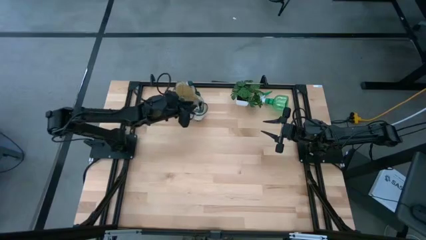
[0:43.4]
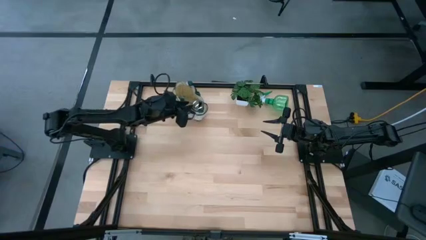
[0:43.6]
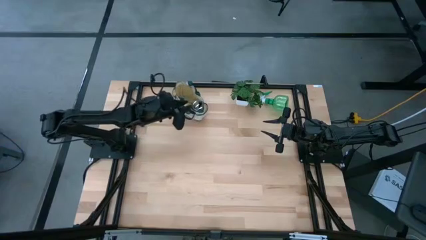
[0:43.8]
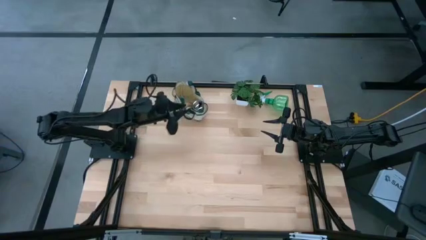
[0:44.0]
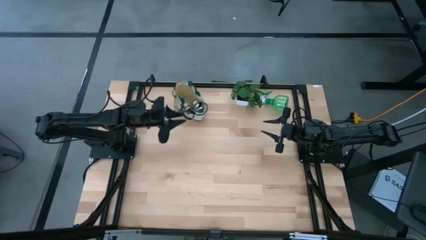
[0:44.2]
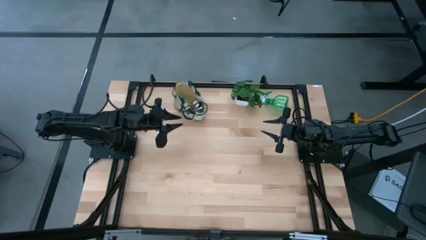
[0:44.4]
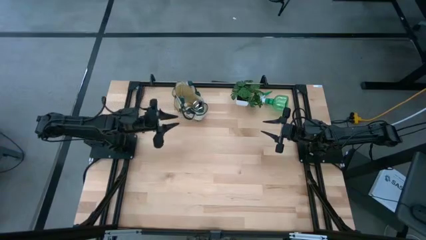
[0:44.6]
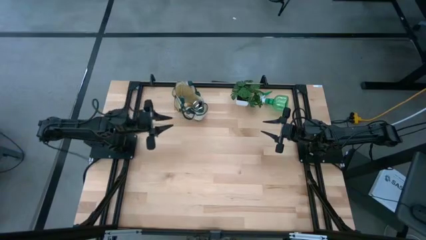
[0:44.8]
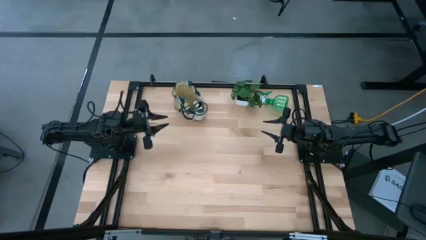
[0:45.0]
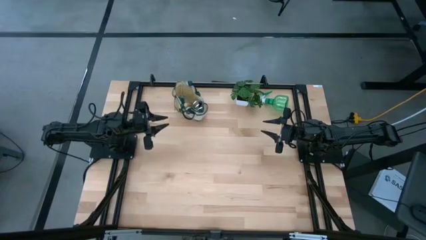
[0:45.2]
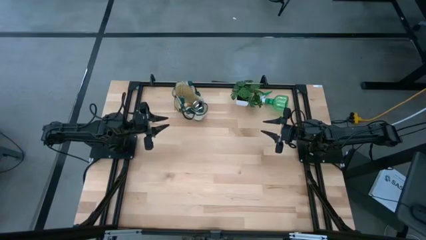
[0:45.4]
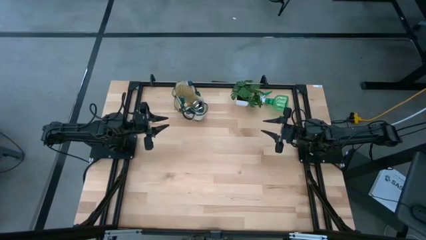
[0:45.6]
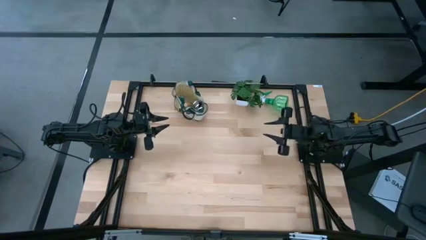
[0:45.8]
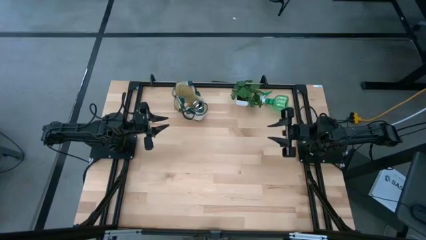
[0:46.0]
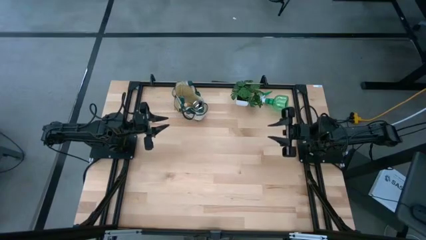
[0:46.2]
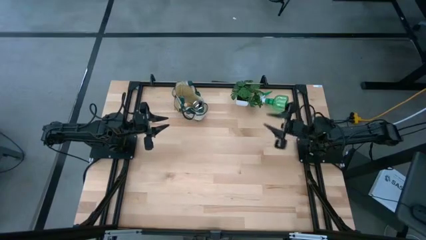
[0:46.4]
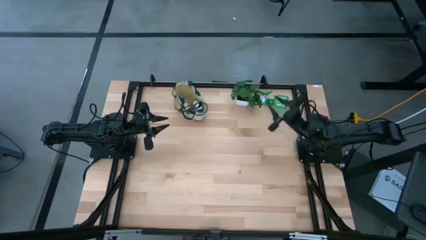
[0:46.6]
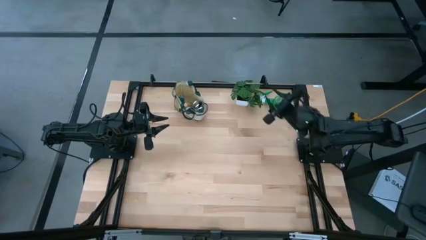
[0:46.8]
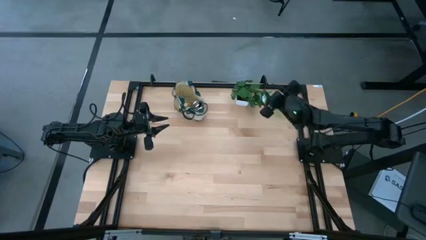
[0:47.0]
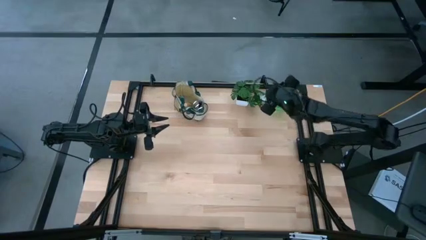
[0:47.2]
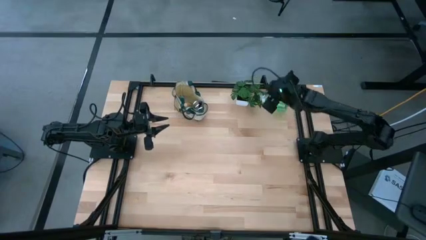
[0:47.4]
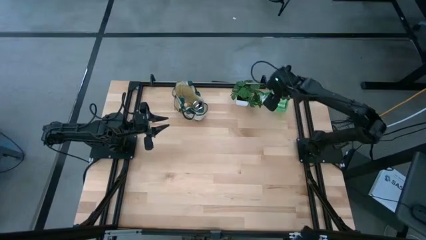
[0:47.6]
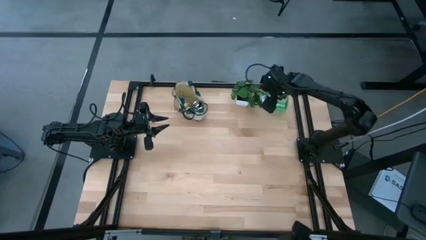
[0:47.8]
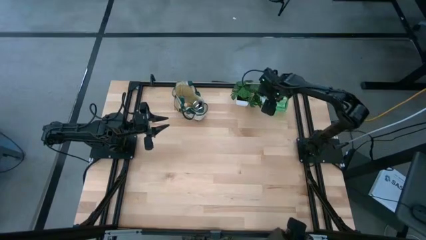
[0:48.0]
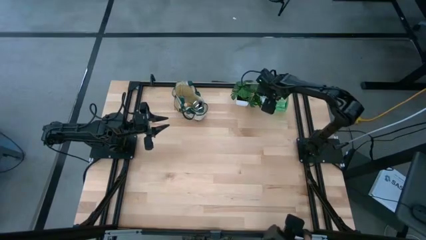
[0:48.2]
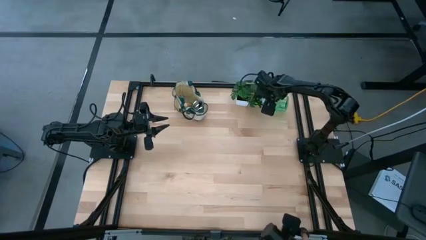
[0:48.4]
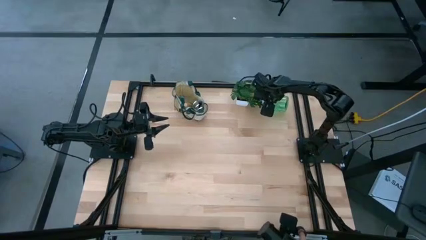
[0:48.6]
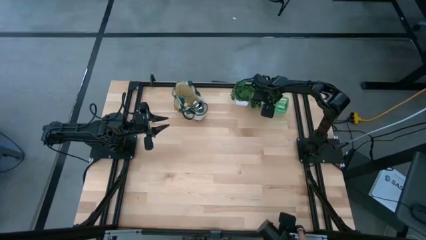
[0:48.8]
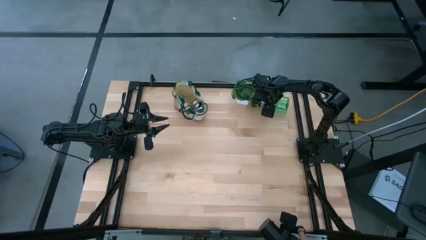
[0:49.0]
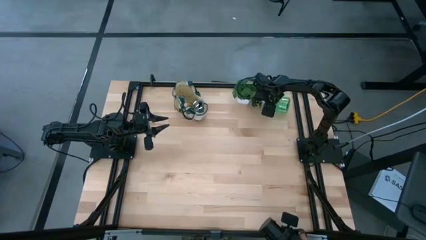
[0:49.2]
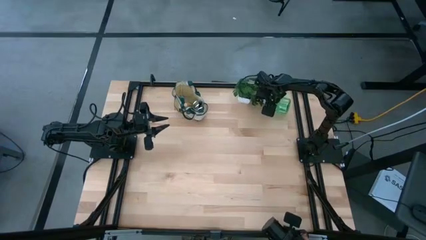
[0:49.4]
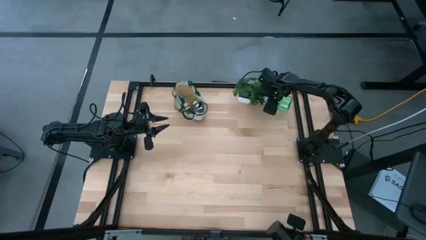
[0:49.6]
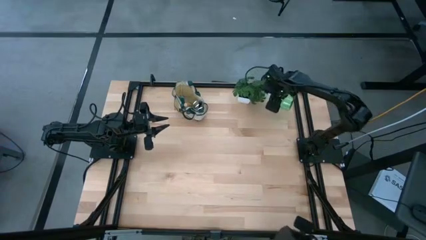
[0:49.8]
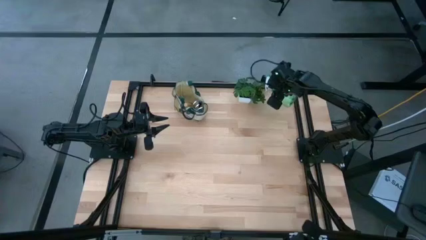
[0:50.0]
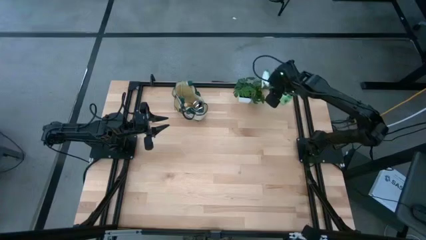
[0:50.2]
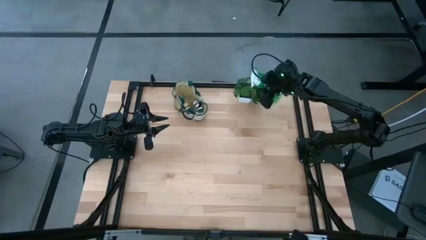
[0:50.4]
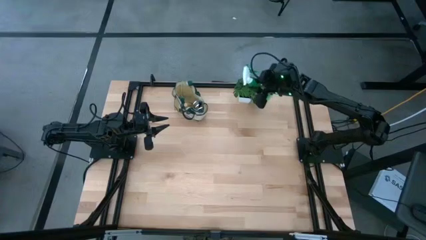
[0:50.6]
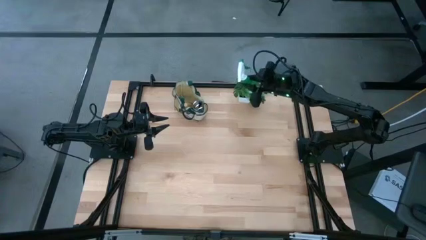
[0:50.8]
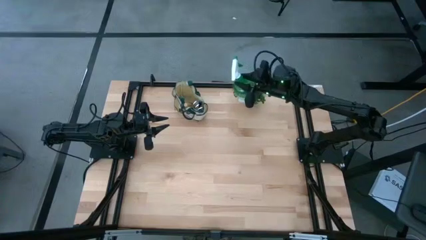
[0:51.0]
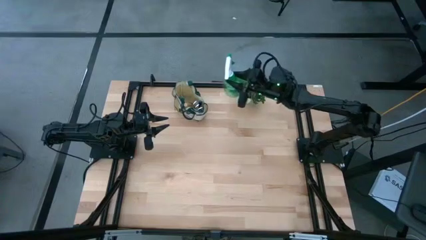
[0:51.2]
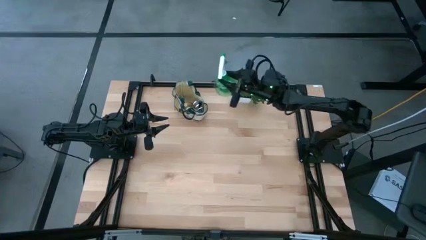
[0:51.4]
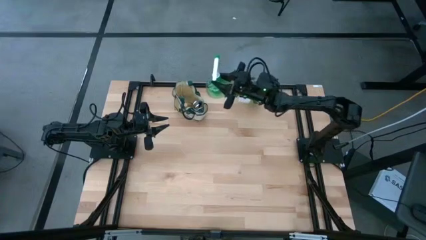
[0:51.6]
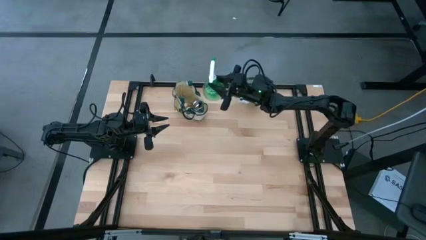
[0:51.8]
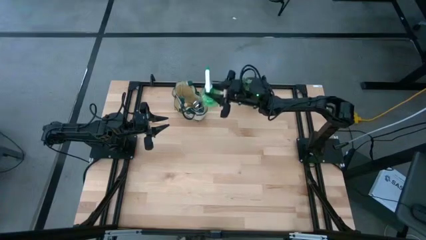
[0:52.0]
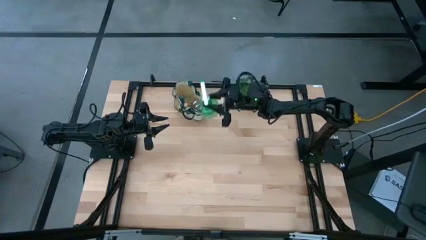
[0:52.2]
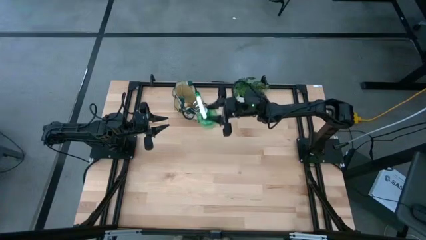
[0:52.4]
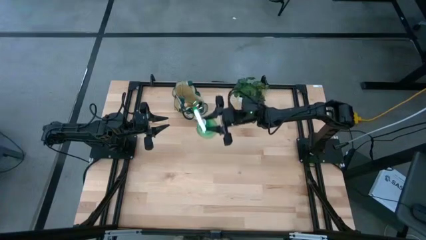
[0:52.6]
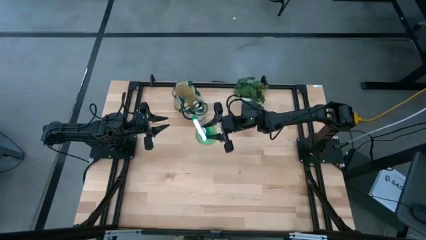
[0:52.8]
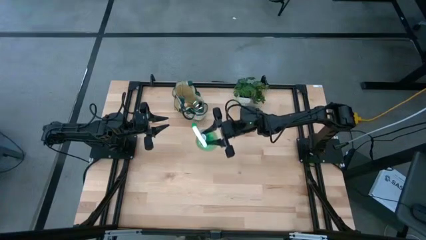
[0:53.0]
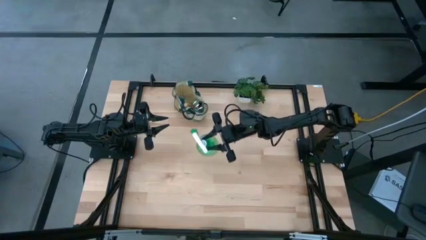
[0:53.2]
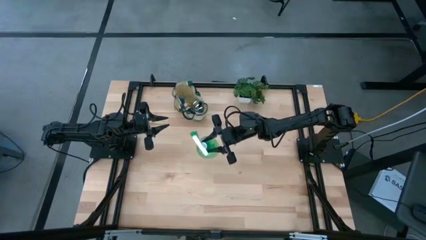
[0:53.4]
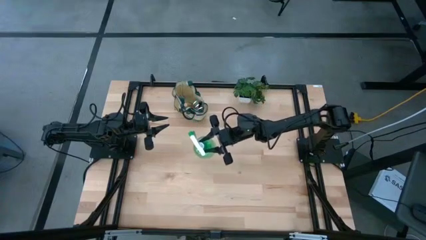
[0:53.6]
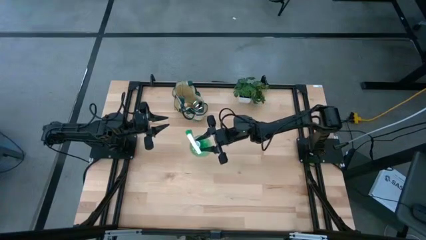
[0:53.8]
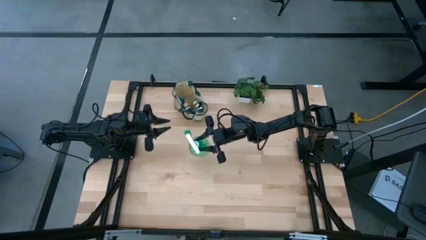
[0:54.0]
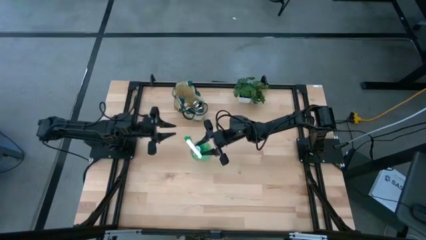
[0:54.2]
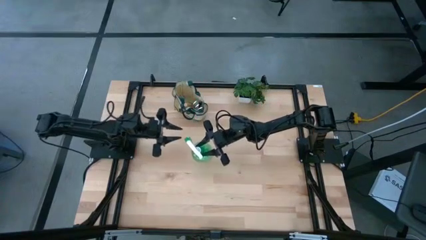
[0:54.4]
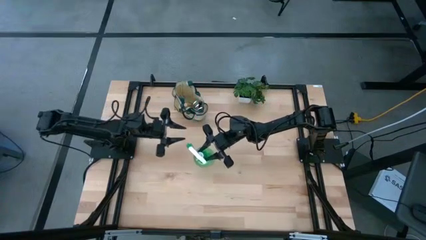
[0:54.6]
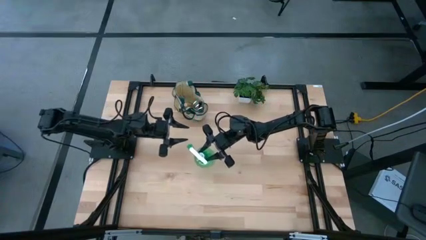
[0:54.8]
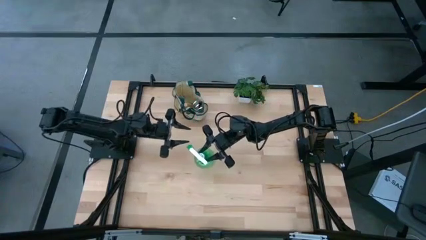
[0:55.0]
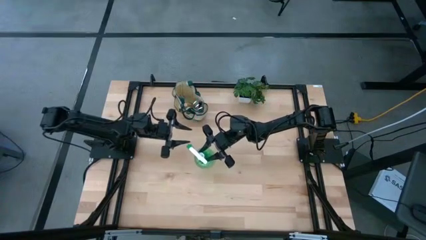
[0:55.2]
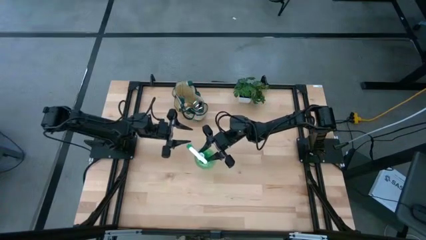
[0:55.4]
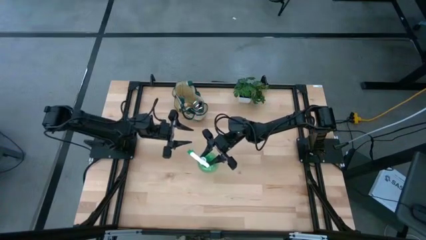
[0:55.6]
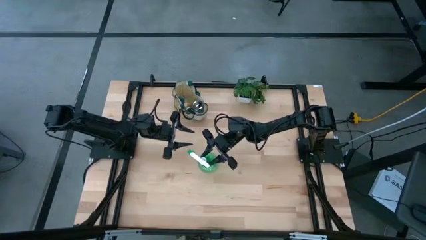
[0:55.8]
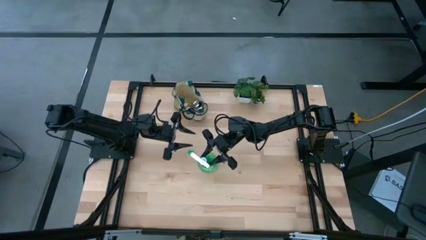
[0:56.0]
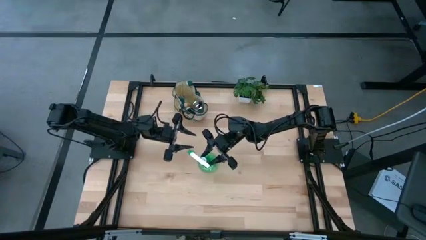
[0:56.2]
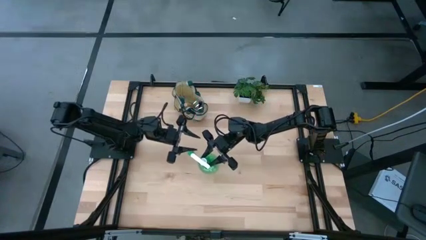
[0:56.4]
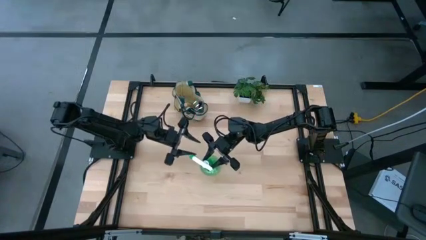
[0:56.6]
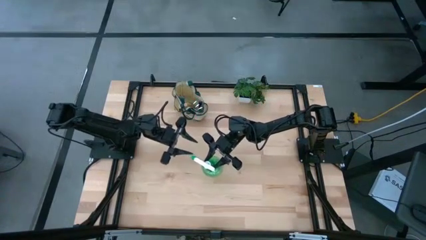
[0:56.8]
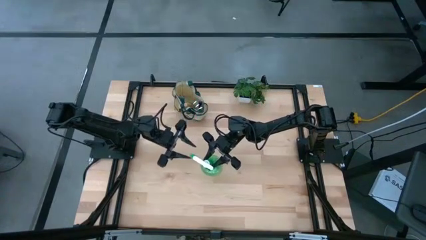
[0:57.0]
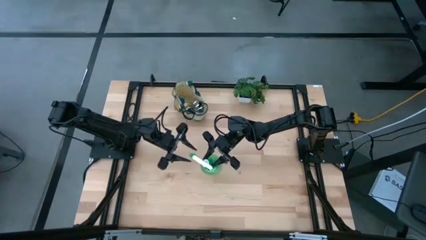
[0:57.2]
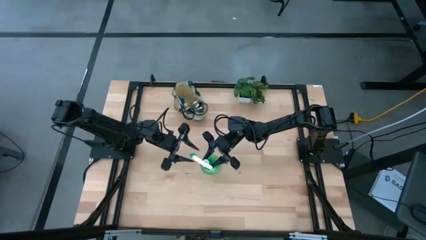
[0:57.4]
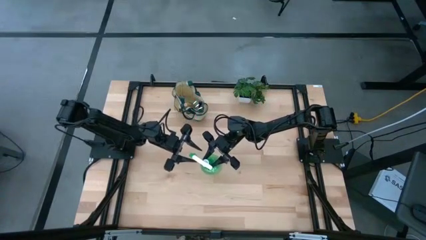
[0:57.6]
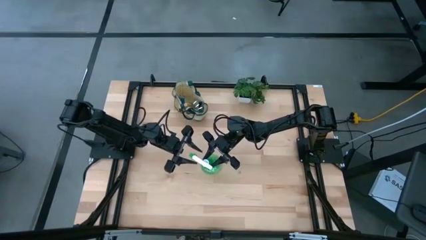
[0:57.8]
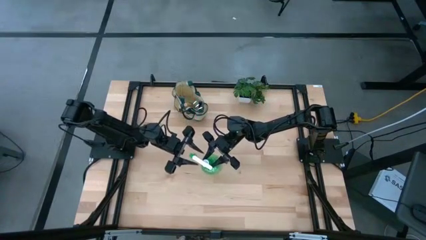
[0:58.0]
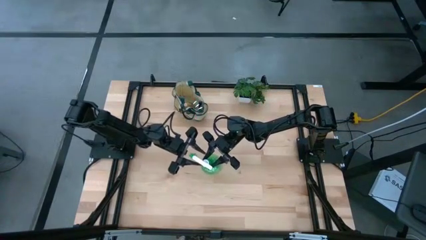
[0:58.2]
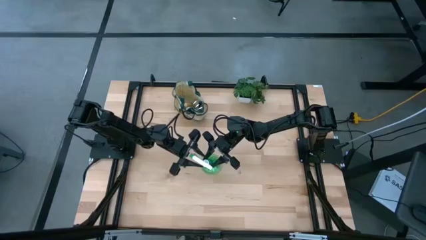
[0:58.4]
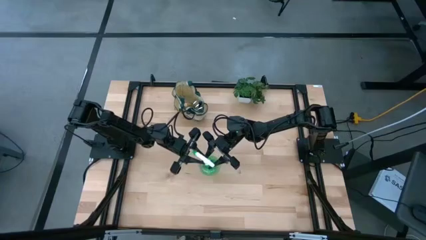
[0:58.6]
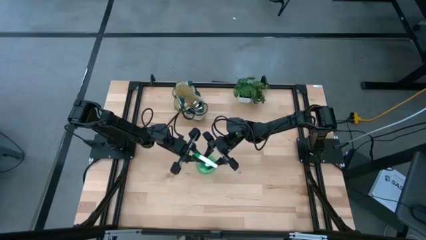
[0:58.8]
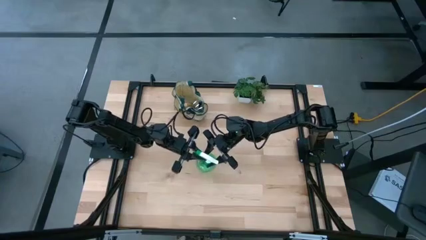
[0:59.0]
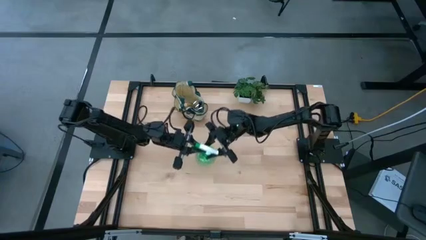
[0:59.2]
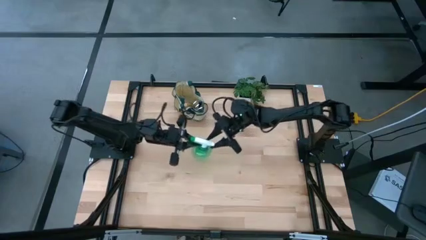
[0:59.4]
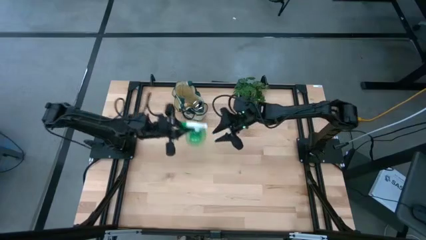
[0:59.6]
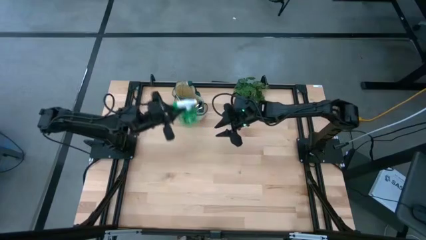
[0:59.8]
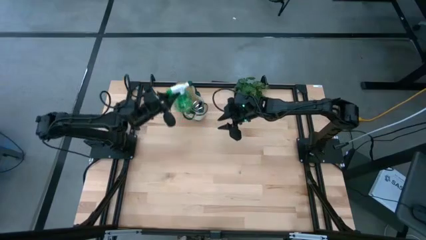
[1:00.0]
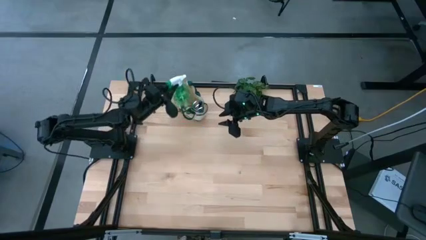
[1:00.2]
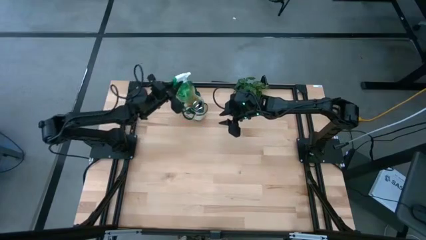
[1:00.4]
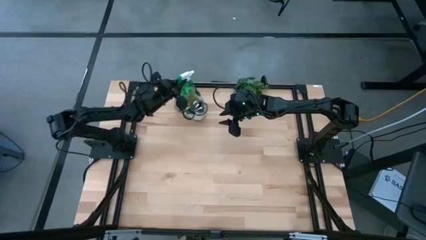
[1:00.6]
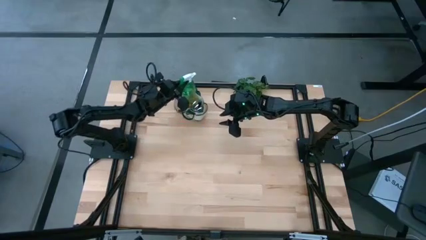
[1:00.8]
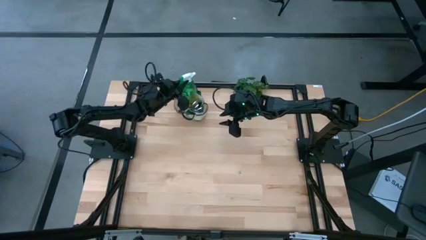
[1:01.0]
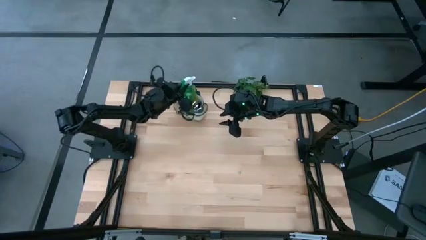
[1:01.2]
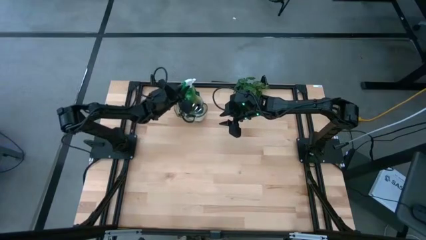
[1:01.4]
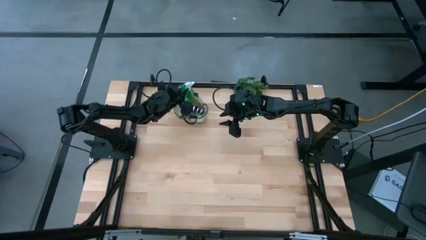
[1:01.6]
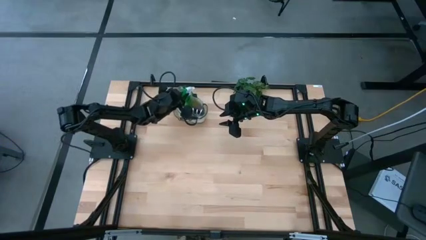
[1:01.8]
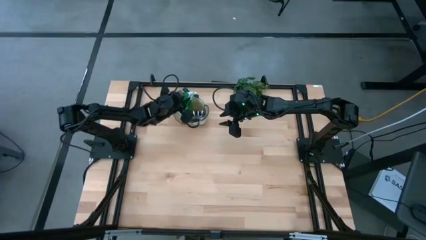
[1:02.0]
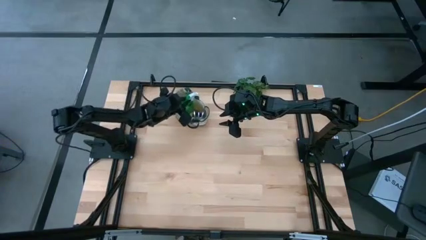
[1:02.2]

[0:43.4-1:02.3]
Task: Pick & Place Garden tools in Gardening bag
Put the green spray bottle into the gardening bag
